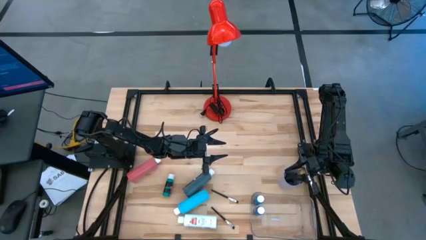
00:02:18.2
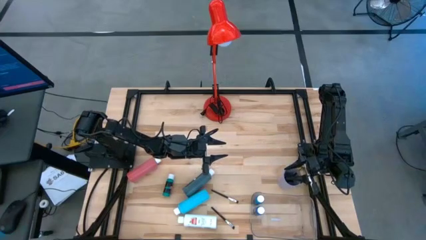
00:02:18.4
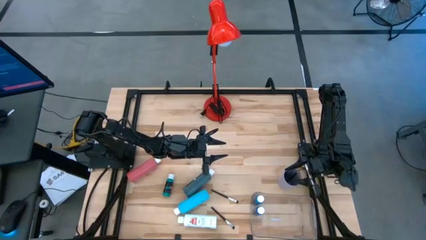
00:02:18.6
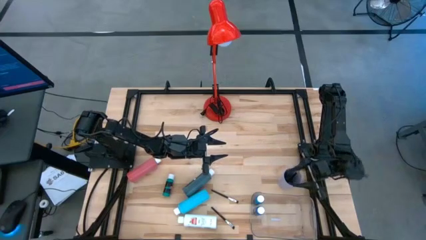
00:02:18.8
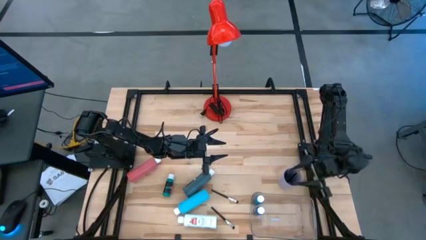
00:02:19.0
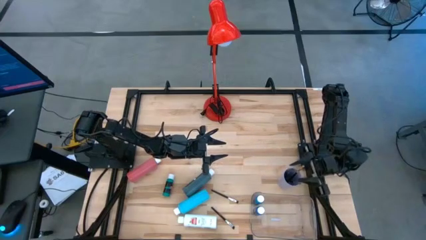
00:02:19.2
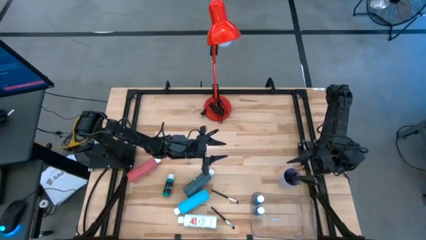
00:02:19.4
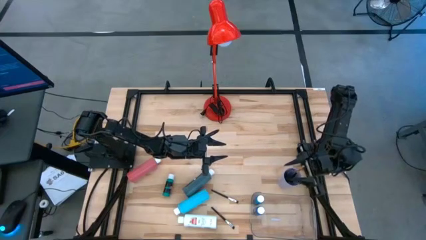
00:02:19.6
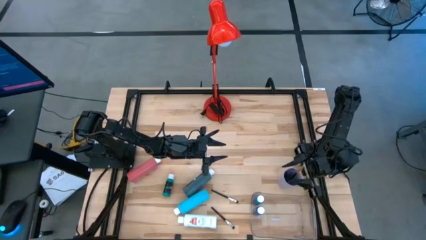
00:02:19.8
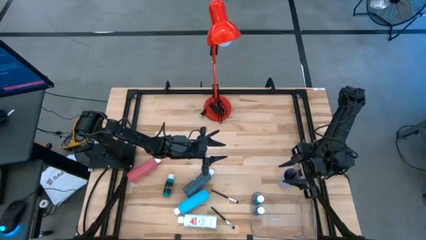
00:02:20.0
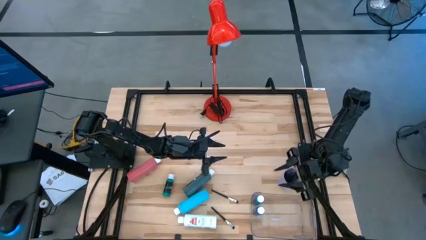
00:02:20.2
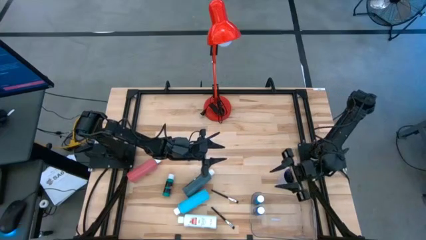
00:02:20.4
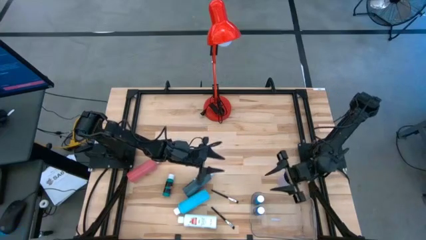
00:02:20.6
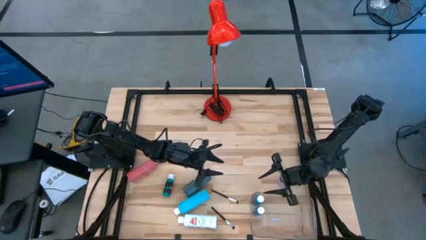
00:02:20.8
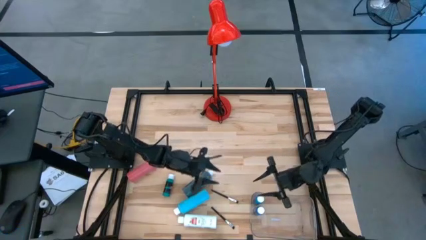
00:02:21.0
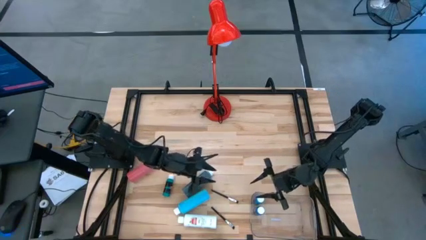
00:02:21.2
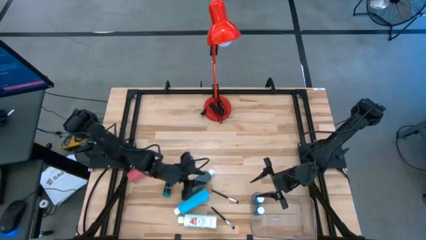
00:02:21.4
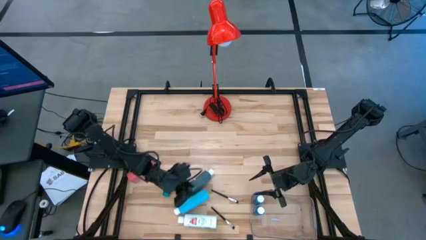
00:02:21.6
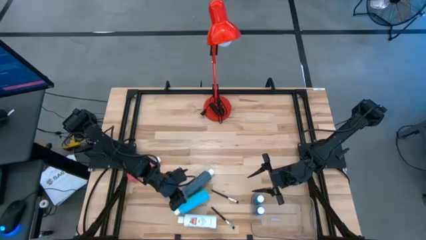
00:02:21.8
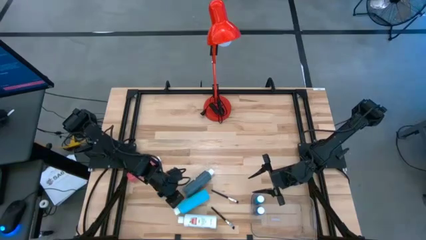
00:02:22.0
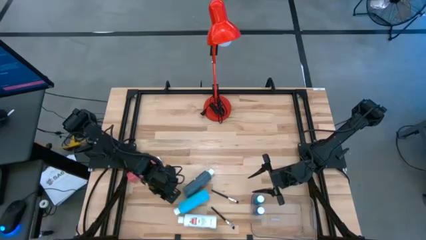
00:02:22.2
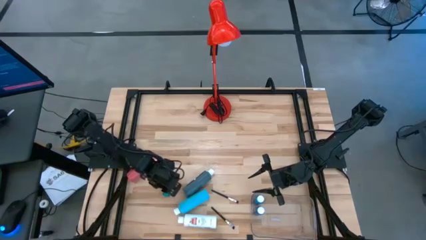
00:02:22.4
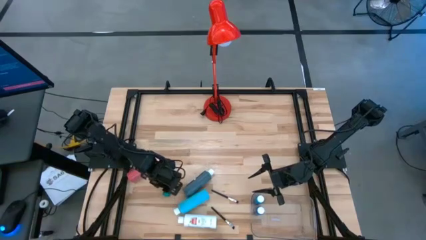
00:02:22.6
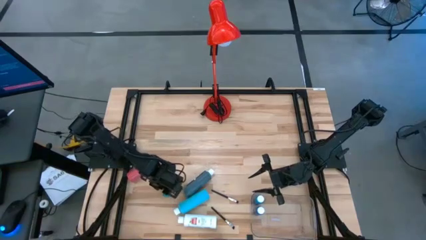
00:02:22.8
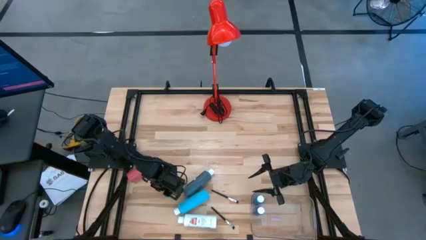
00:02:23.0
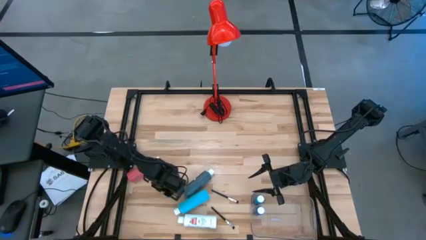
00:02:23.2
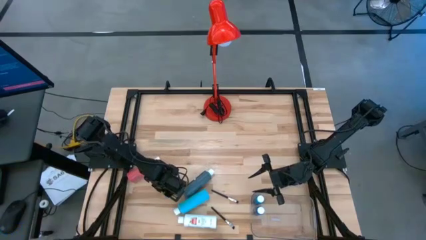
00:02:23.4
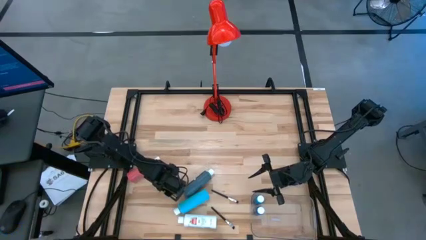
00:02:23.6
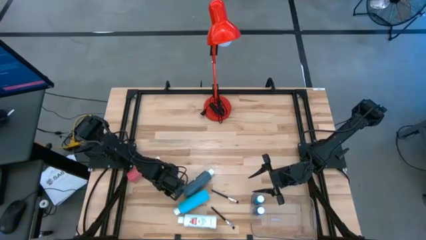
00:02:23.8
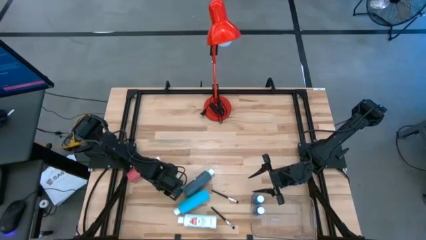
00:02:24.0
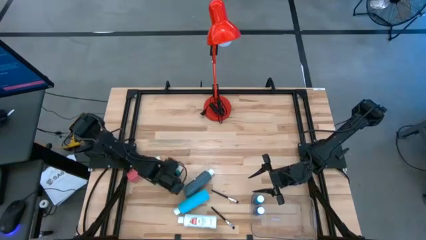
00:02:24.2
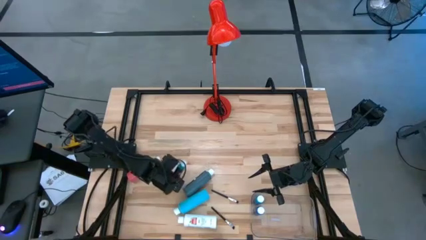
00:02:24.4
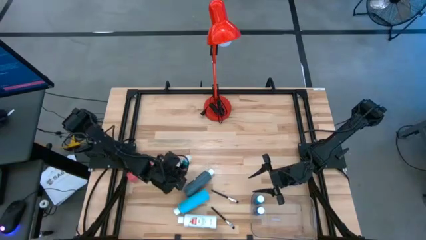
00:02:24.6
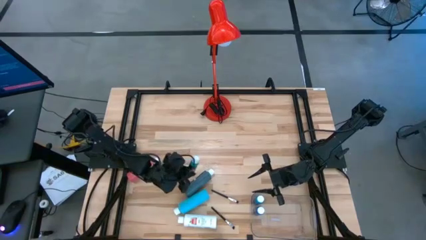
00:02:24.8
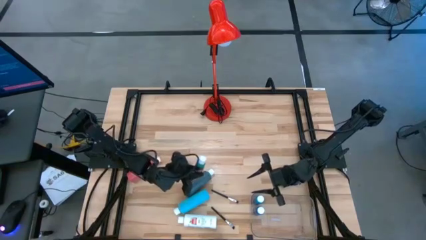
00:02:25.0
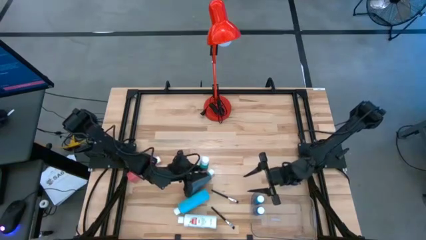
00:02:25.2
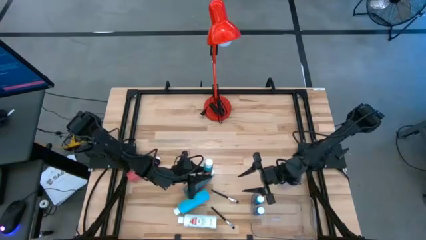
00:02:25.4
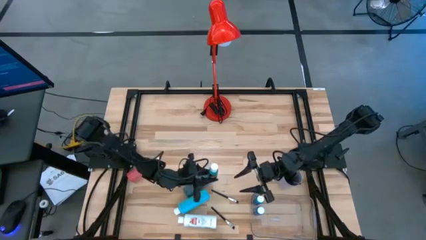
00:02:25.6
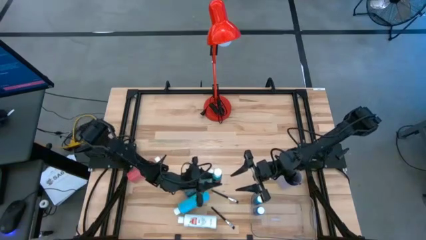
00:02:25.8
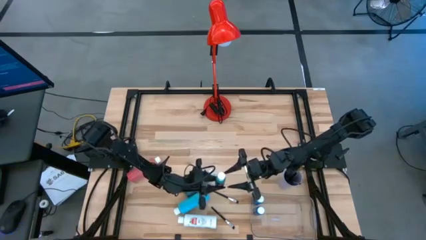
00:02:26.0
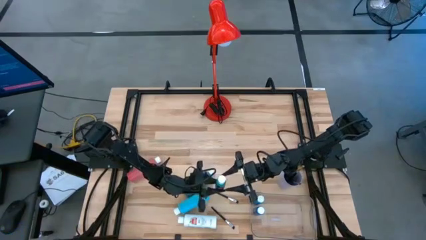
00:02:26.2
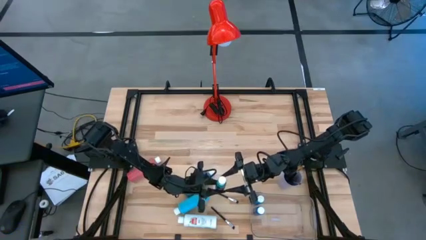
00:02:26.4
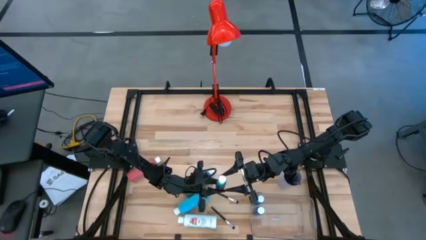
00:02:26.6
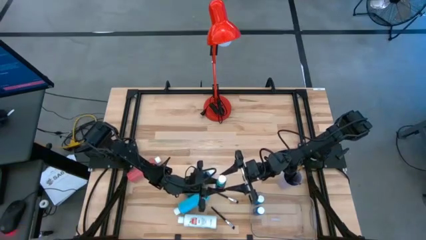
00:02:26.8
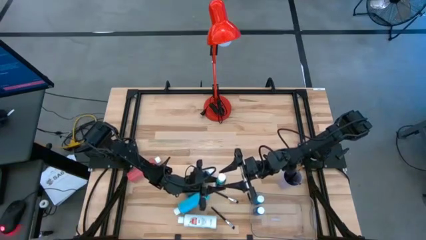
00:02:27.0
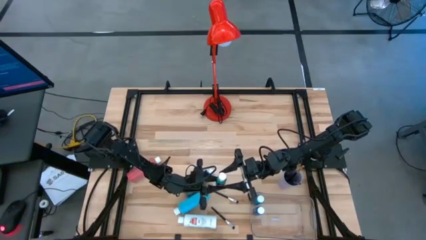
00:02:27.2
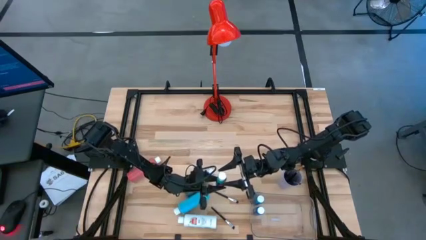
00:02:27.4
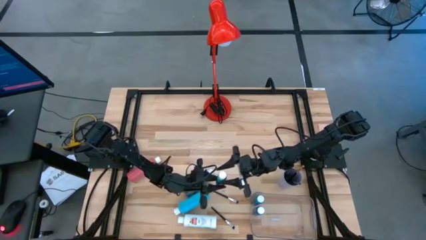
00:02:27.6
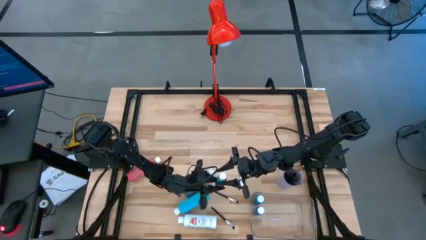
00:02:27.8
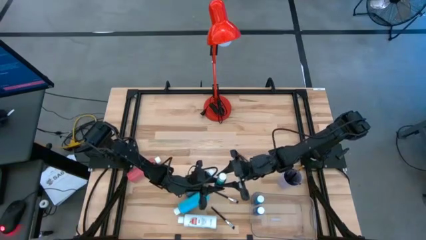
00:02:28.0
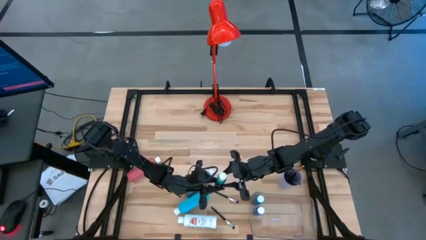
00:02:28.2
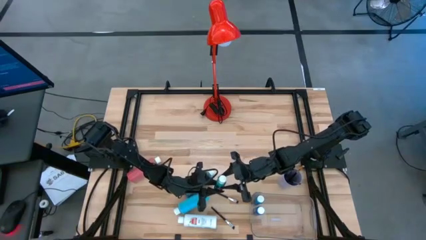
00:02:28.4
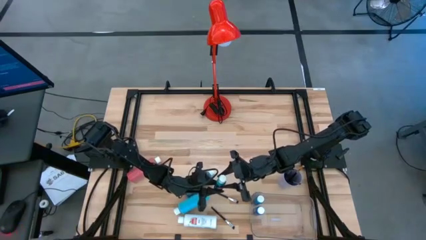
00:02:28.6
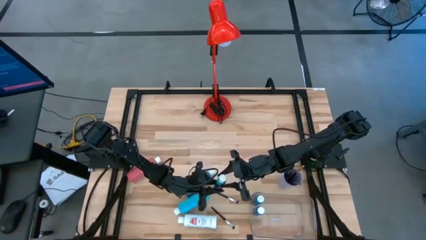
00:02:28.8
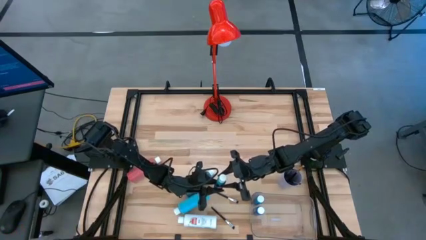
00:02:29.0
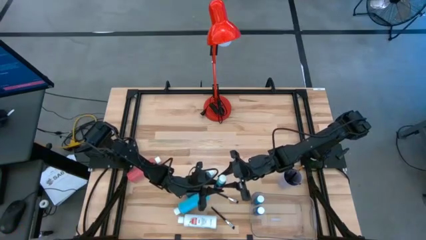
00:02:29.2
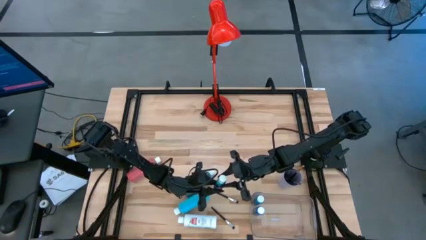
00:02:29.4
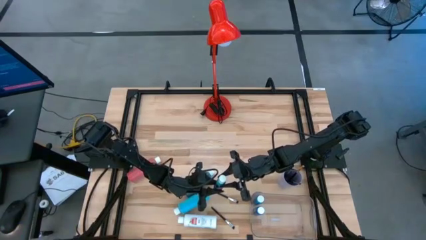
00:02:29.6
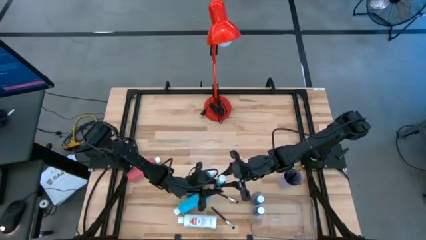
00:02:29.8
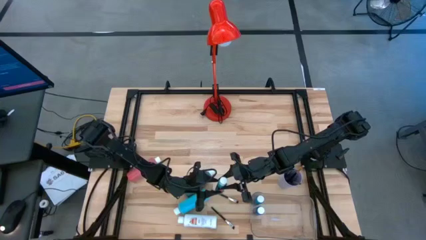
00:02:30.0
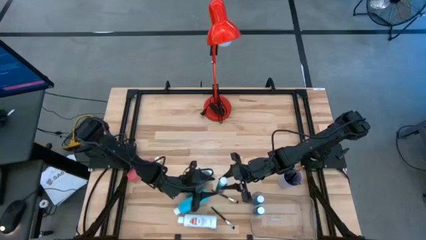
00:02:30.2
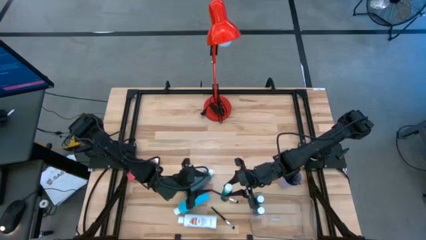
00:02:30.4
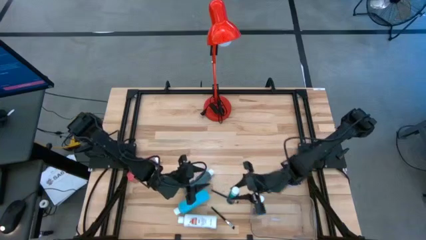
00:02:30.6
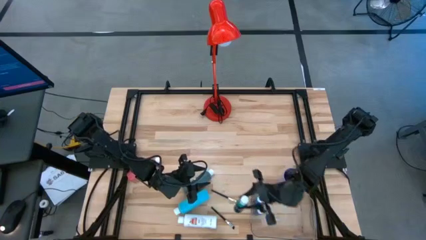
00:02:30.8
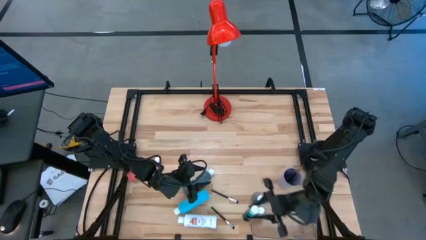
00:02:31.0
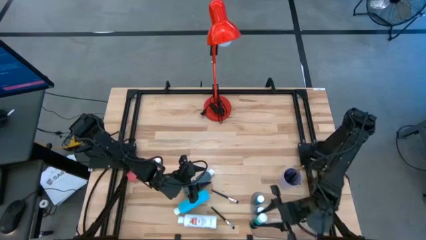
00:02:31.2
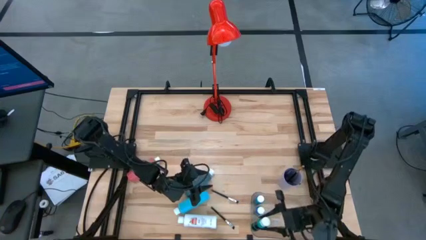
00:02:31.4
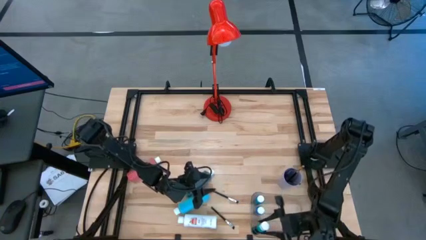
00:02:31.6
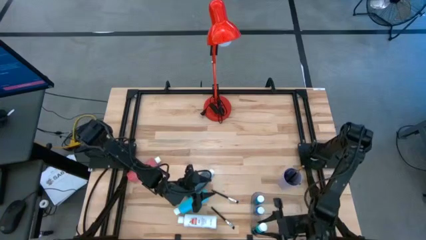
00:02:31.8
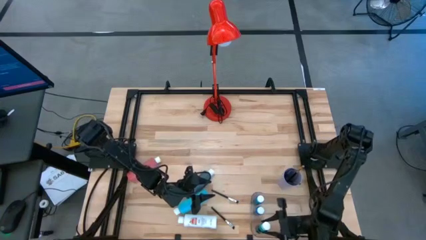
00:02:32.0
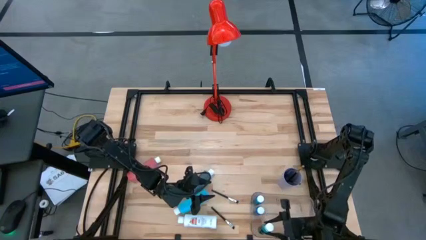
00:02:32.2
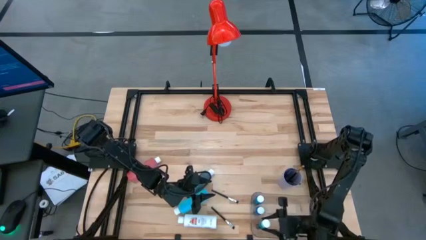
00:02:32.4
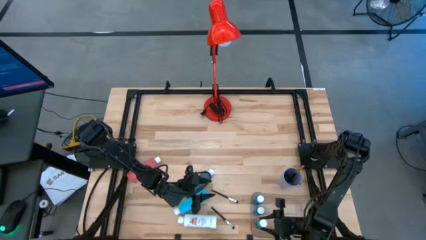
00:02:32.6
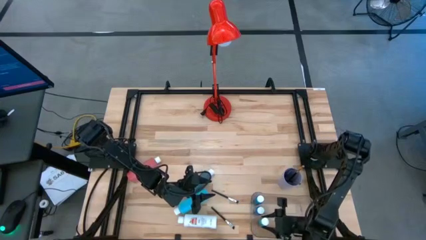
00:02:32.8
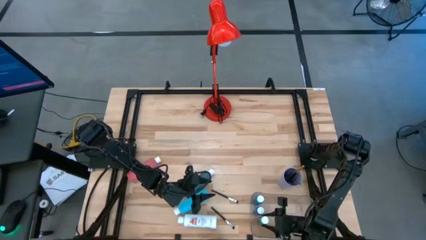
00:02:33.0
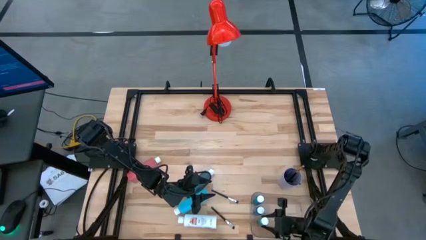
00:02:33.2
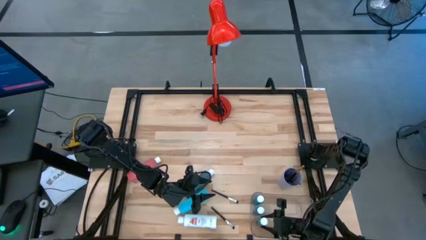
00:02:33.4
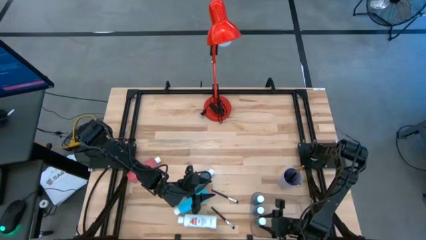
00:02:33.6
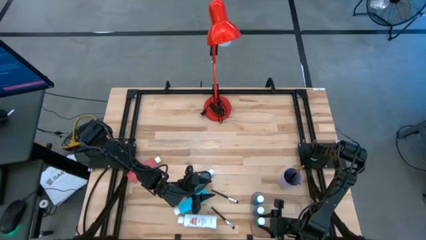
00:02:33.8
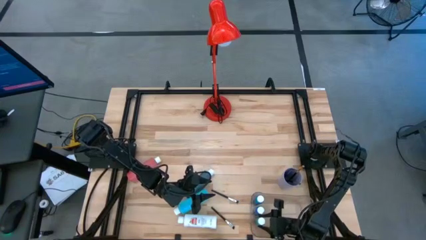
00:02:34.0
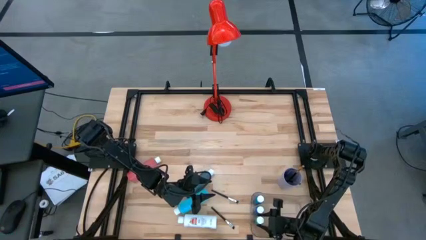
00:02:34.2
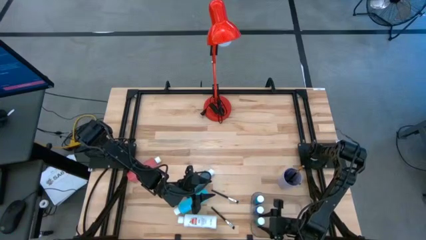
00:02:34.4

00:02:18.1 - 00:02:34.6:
Task: Pick & Place Paint Supplies
Put the dark green pain bottle into the transparent bin
